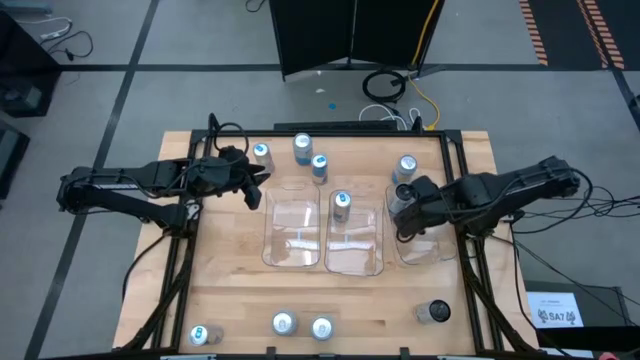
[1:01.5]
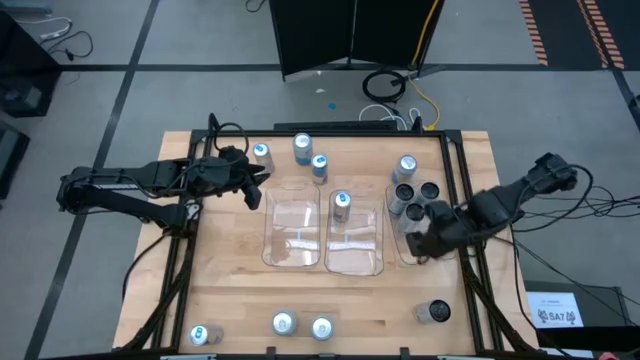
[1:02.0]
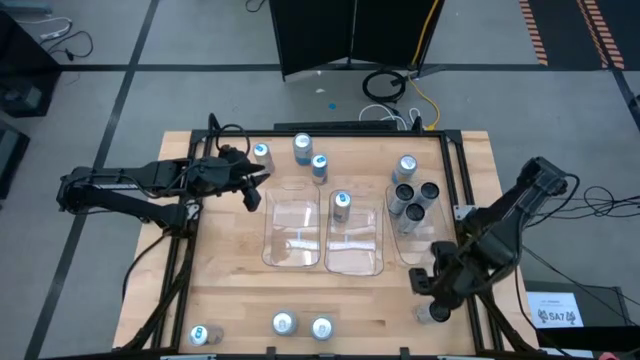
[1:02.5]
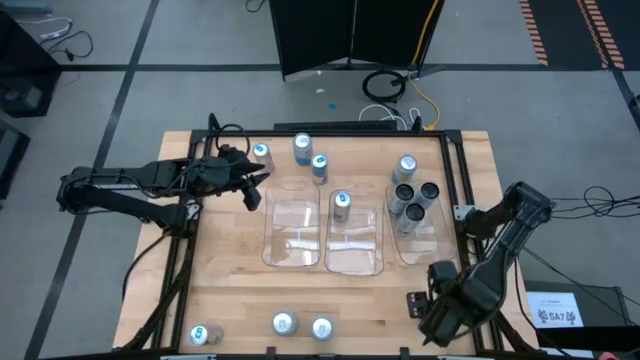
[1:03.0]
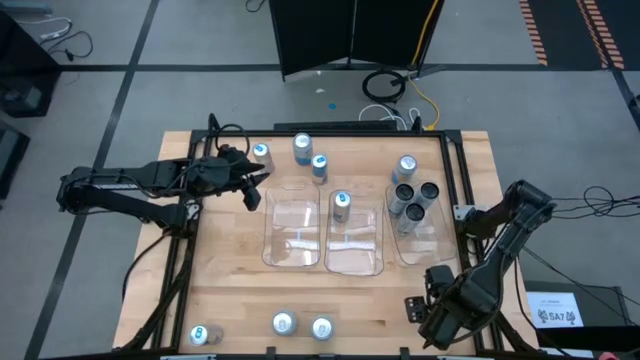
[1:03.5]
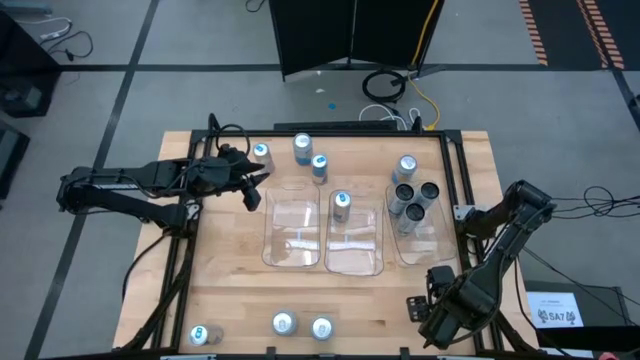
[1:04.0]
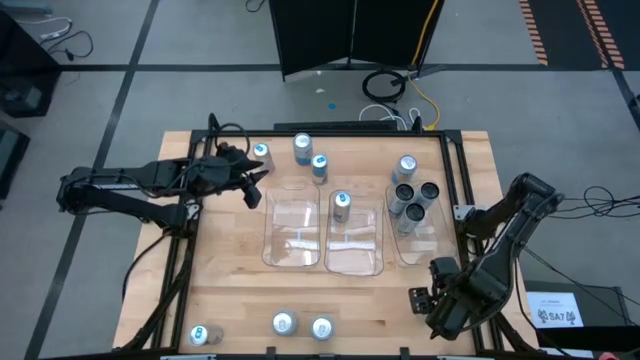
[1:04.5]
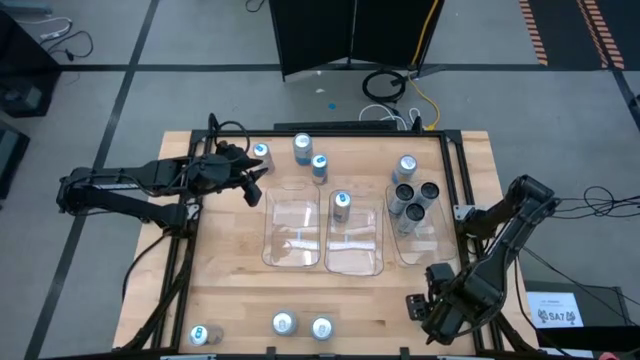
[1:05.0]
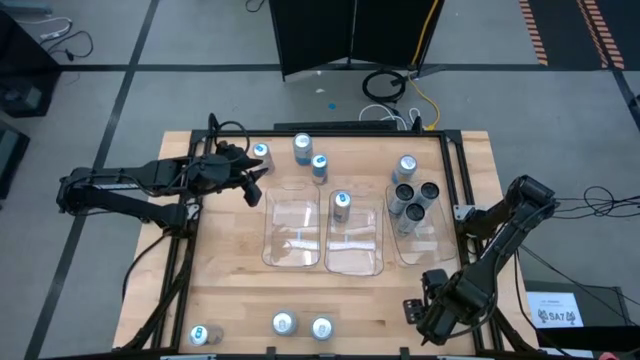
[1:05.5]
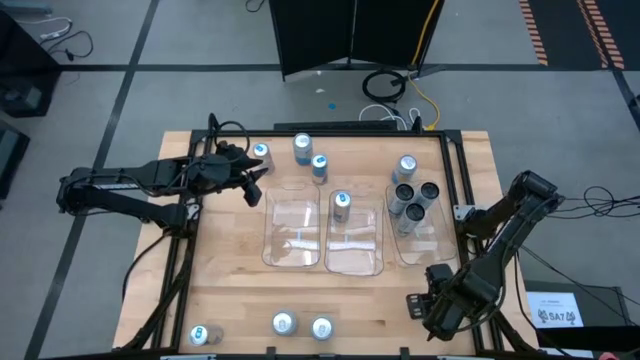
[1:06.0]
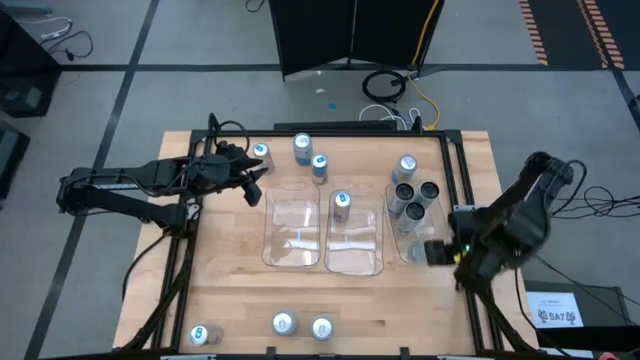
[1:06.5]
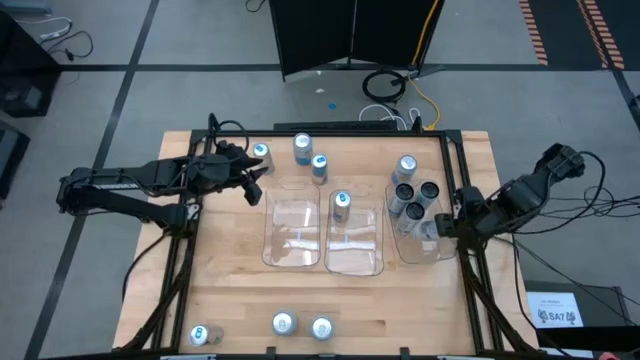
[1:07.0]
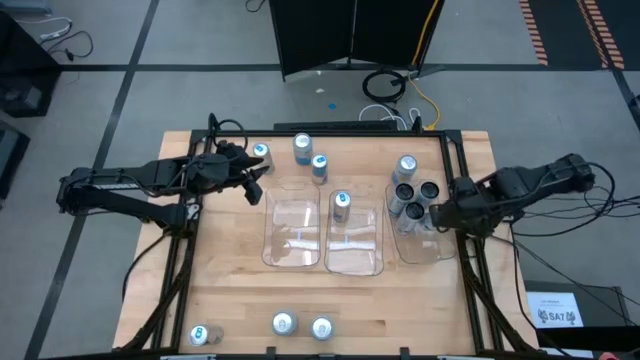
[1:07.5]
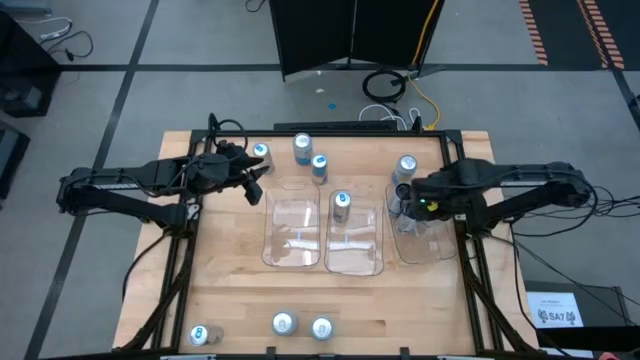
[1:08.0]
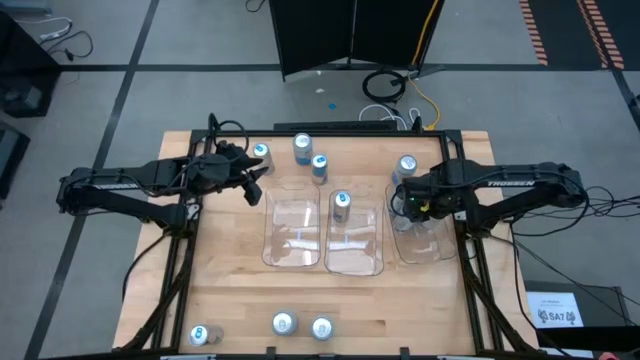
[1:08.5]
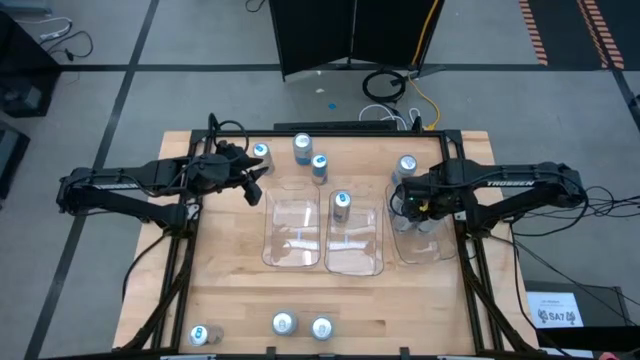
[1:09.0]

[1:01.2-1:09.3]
Task: Sort soda cans
Put the white-blue soda can into the right transparent bin

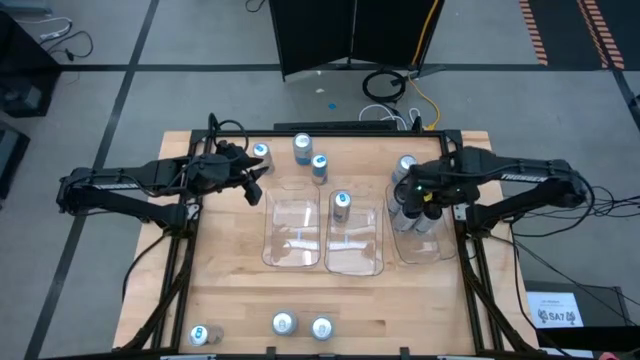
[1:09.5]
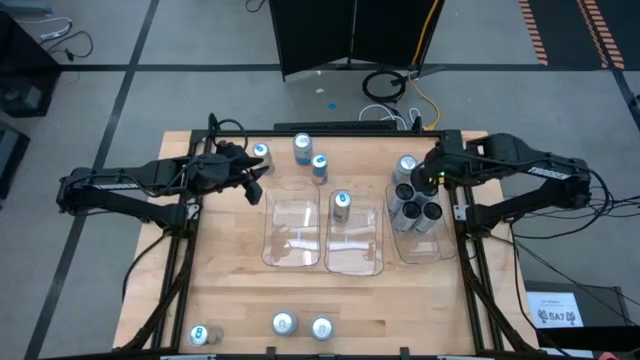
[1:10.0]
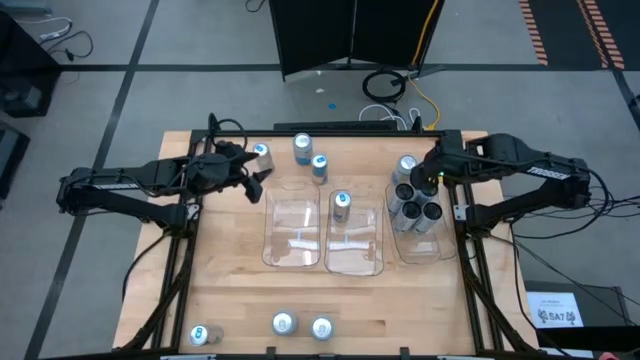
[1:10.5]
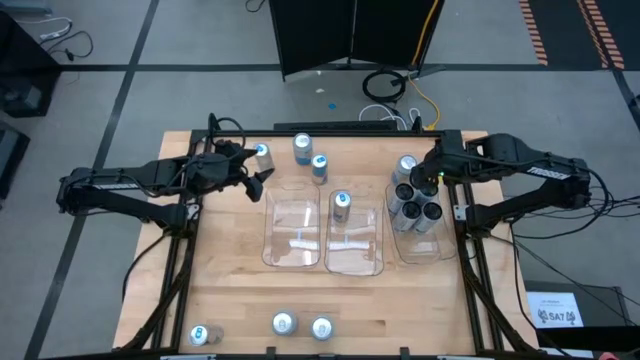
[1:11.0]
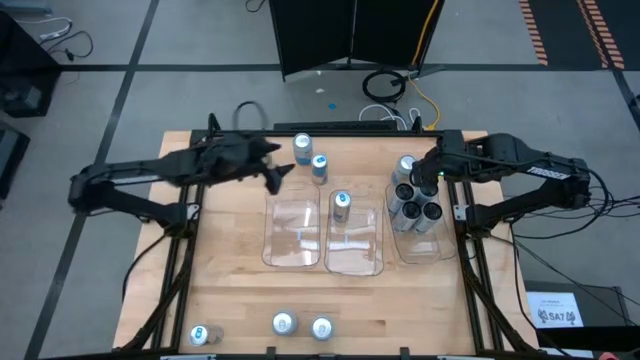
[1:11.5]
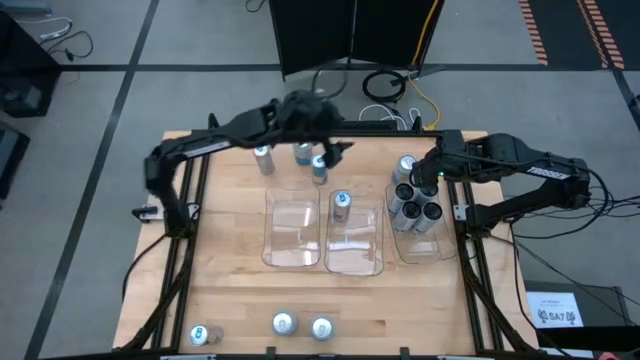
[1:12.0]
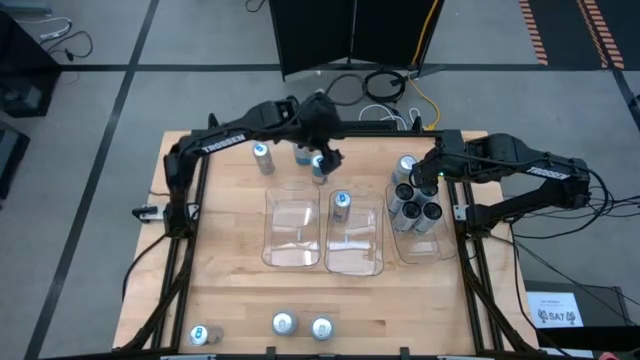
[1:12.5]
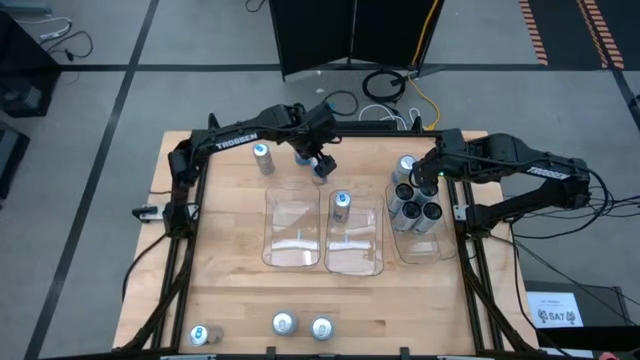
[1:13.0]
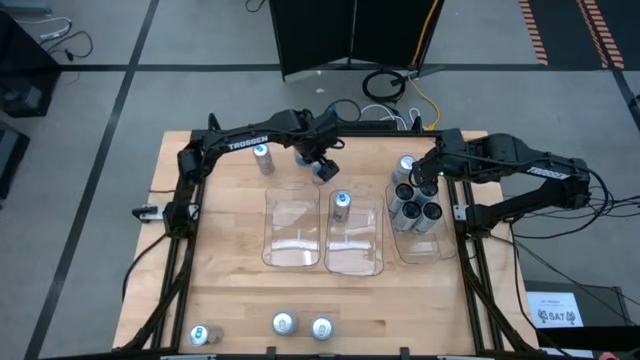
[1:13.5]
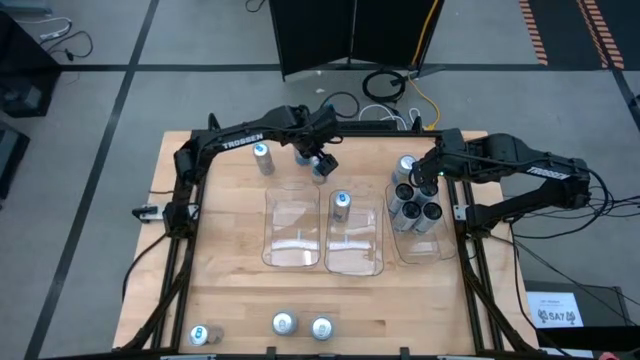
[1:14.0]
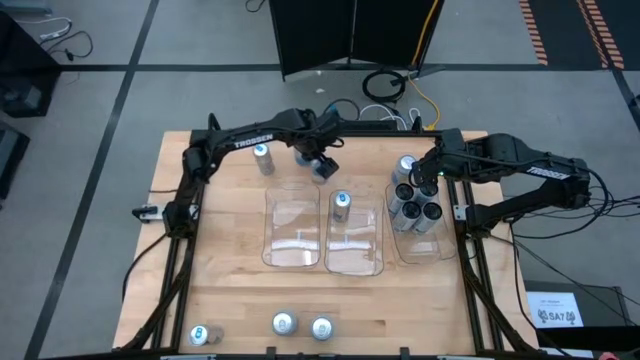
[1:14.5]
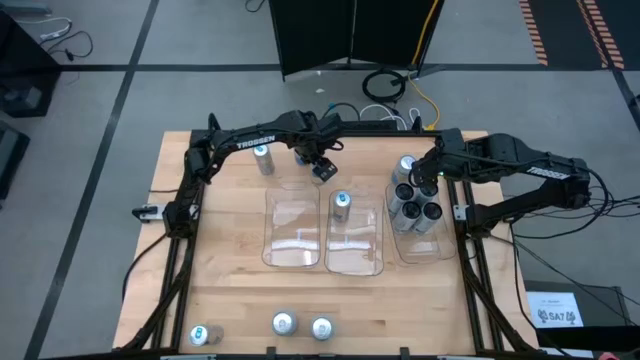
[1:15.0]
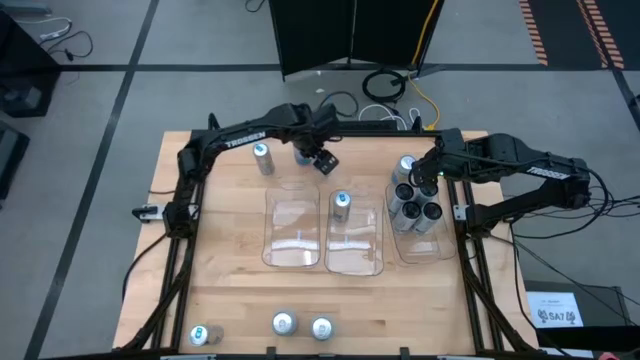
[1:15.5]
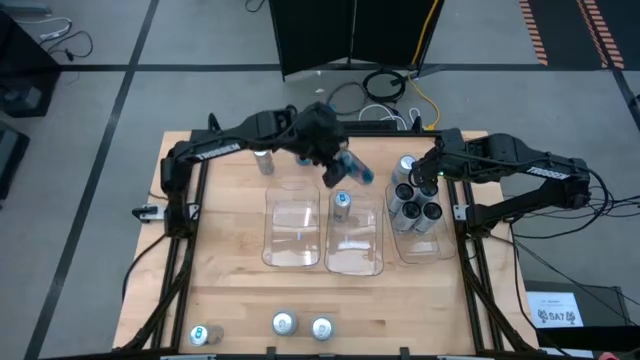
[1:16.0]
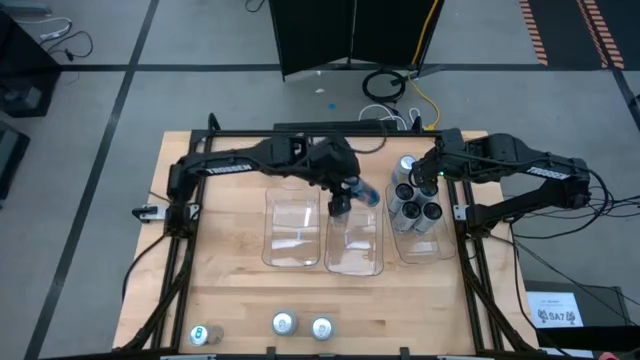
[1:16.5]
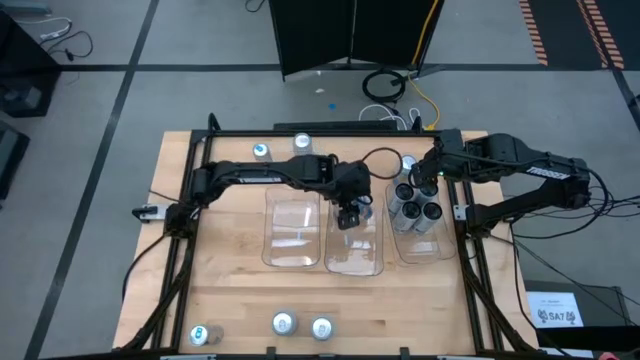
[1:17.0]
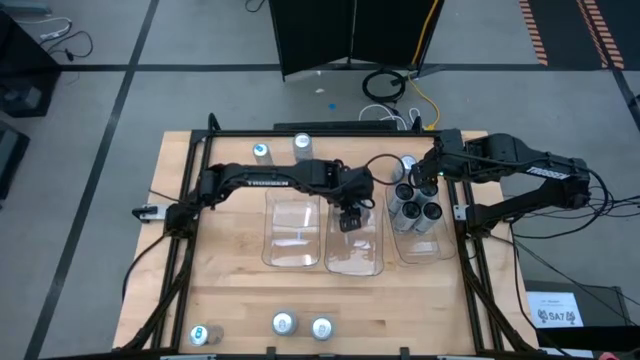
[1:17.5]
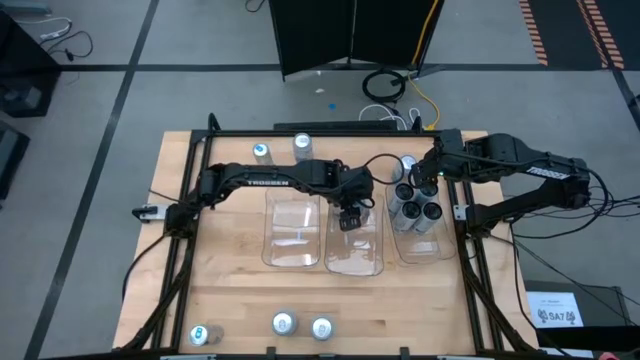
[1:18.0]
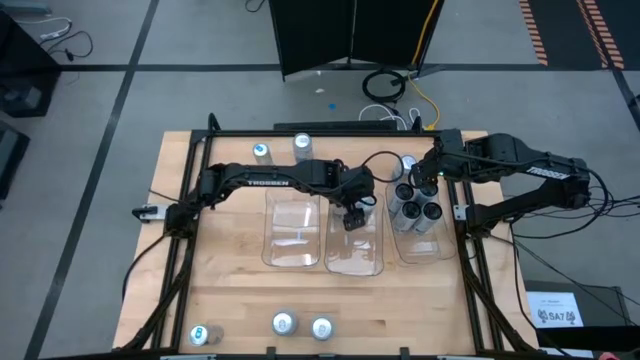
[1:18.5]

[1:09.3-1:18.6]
Put the top right blue soda can into the middle transparent bin

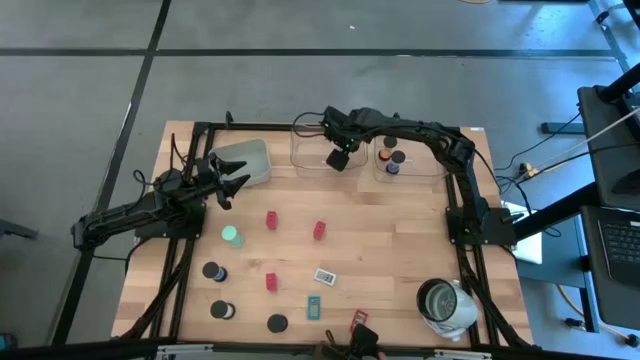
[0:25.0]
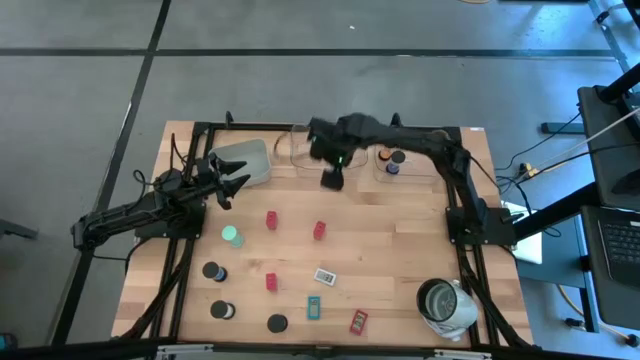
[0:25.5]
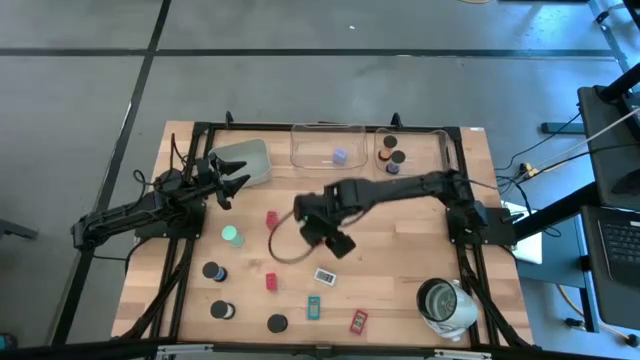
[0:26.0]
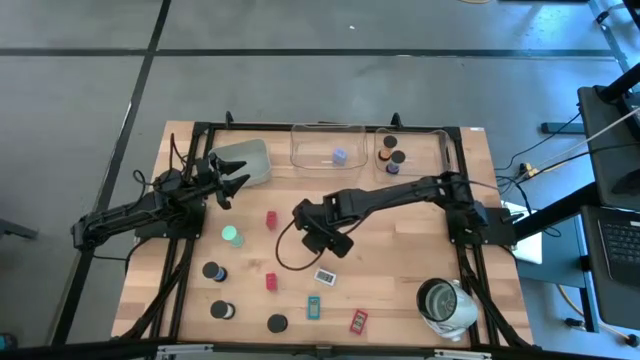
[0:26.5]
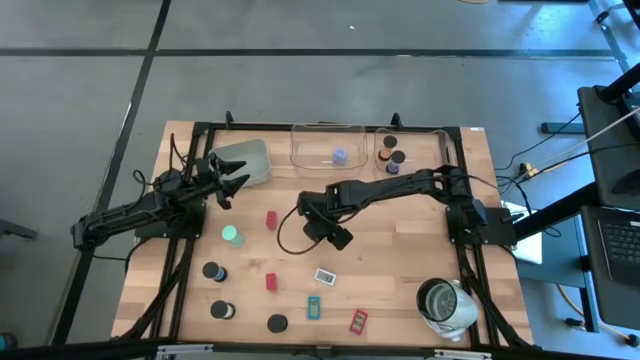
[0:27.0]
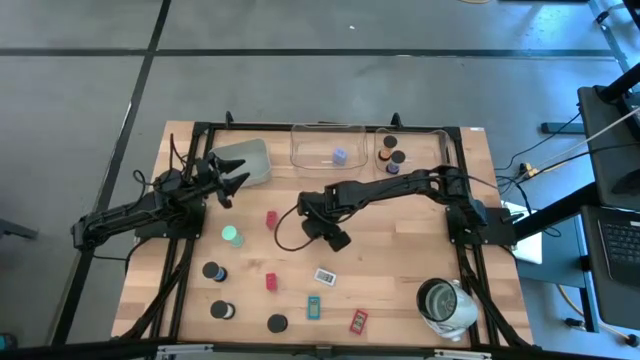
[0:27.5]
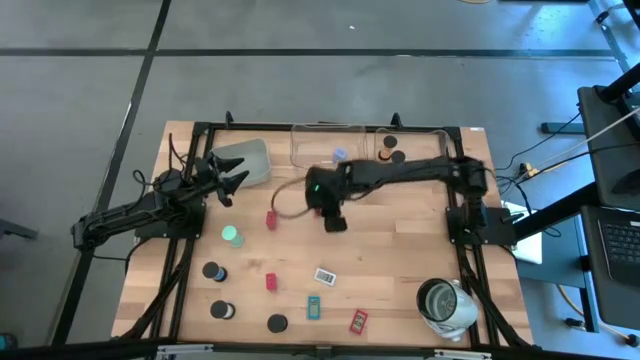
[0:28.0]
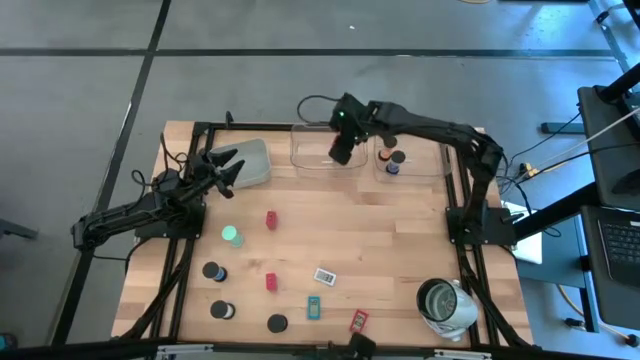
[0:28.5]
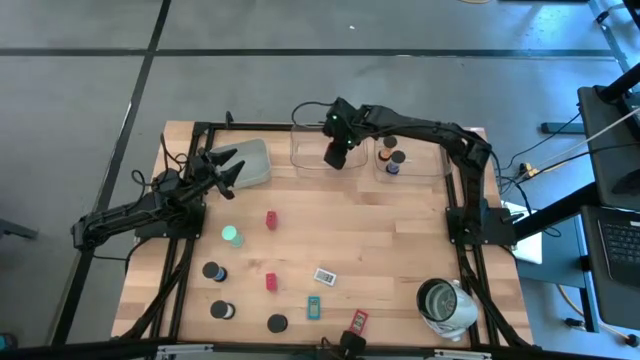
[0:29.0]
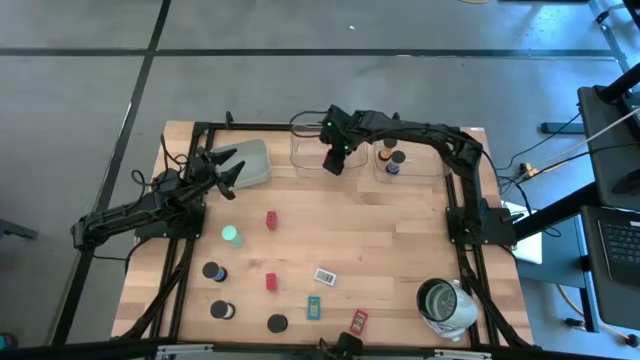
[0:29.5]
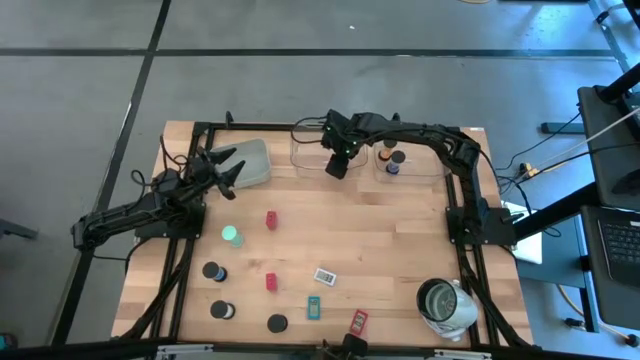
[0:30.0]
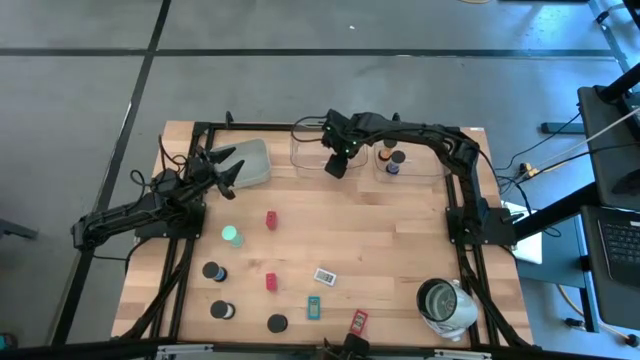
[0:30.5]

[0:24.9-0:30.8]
Task: Pick & Place Office items
Put the right red adapter into the left transparent bin
